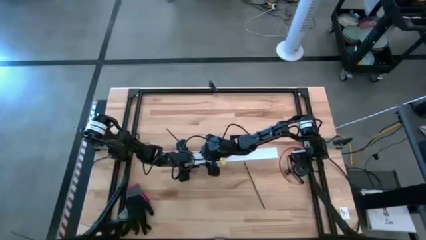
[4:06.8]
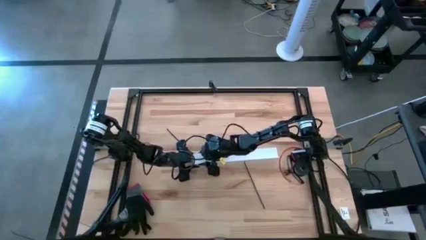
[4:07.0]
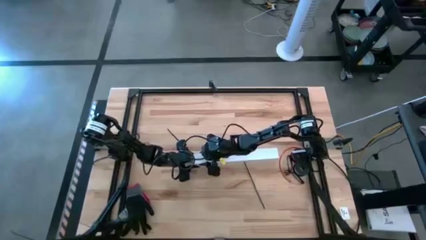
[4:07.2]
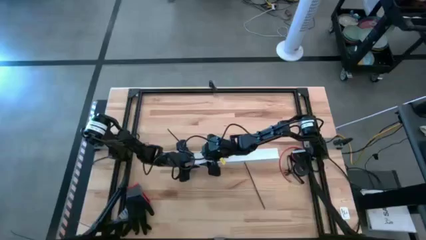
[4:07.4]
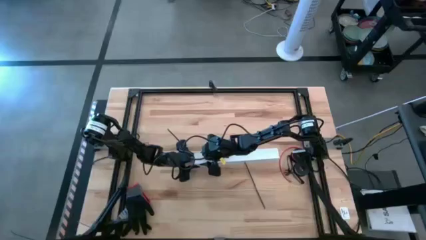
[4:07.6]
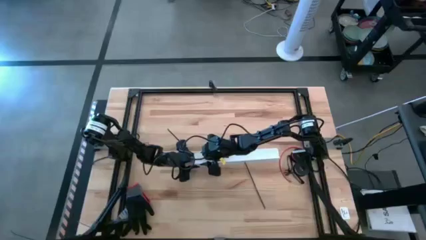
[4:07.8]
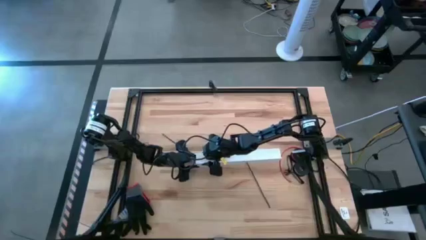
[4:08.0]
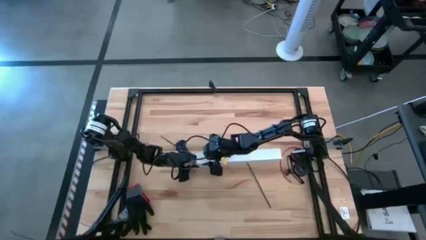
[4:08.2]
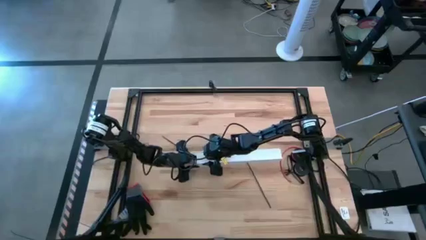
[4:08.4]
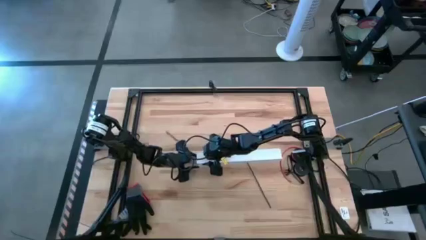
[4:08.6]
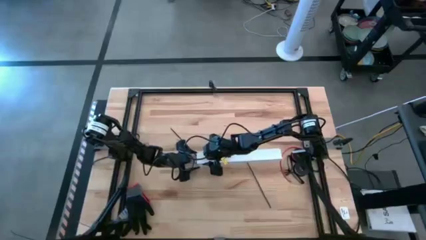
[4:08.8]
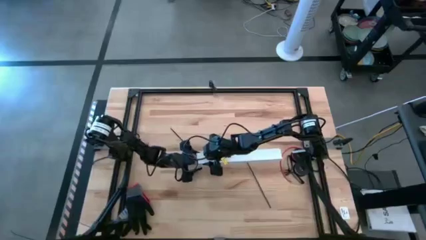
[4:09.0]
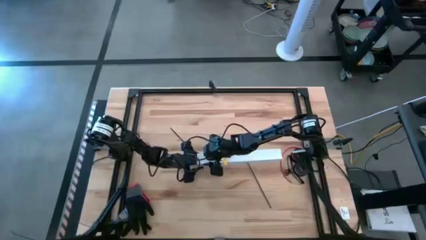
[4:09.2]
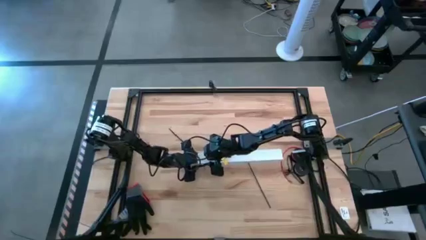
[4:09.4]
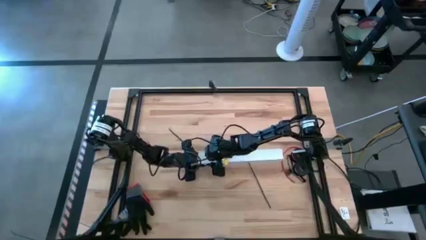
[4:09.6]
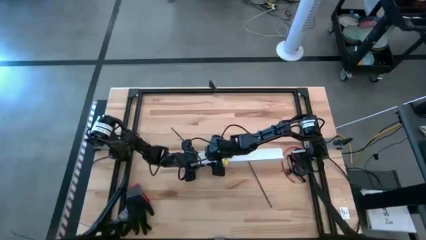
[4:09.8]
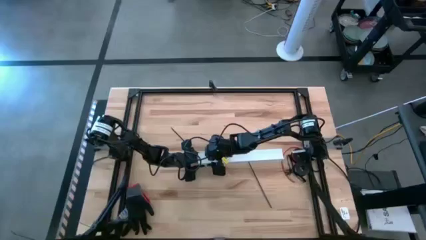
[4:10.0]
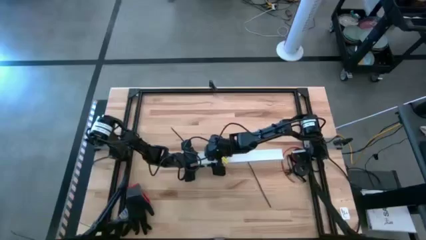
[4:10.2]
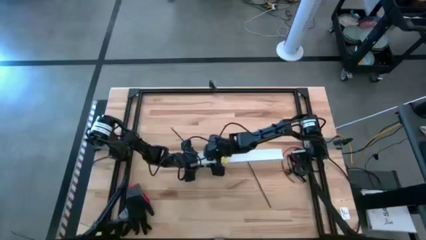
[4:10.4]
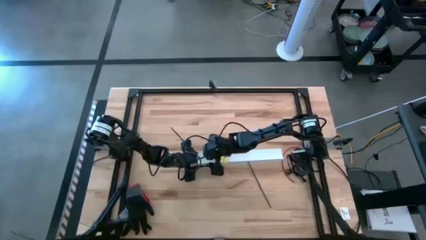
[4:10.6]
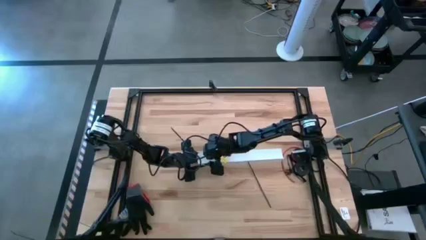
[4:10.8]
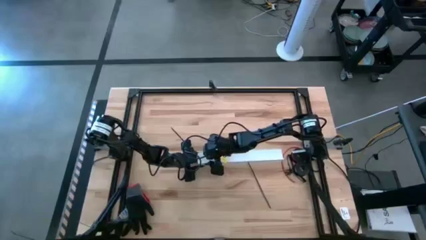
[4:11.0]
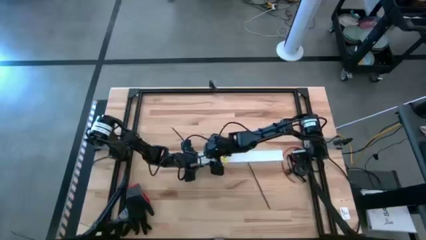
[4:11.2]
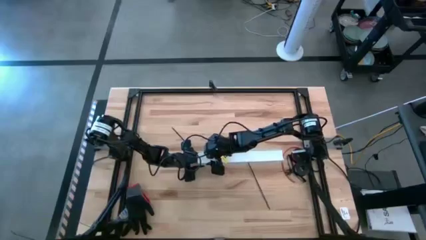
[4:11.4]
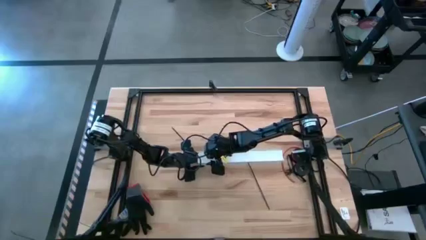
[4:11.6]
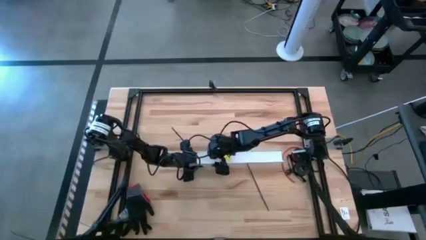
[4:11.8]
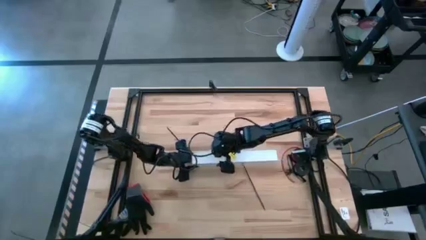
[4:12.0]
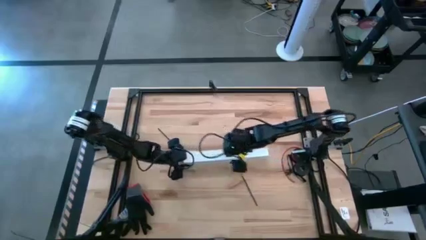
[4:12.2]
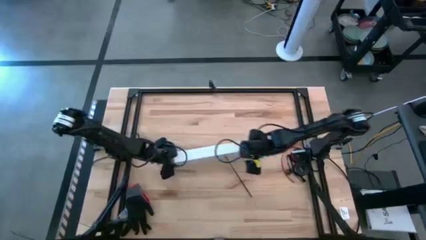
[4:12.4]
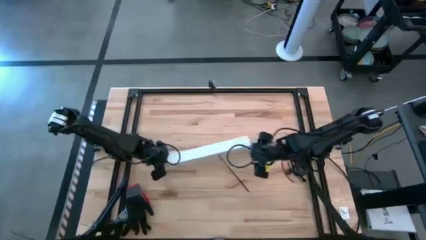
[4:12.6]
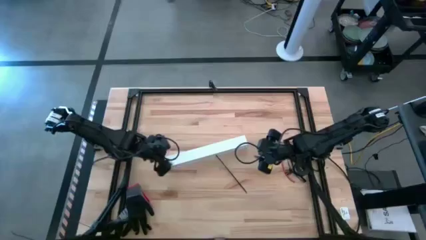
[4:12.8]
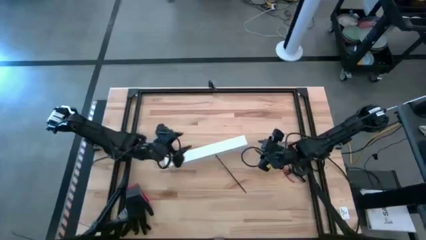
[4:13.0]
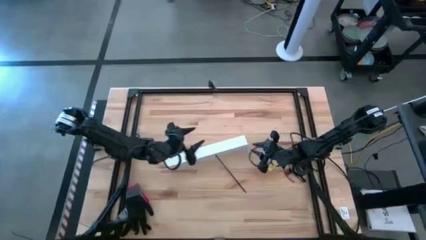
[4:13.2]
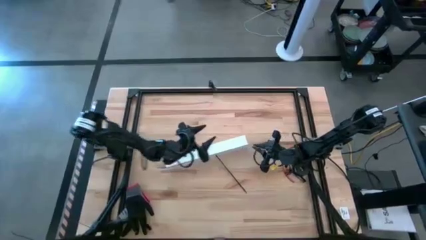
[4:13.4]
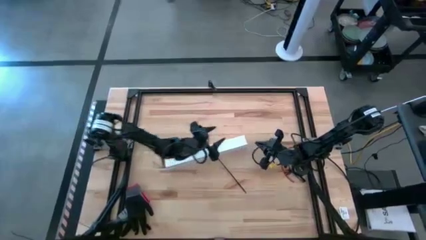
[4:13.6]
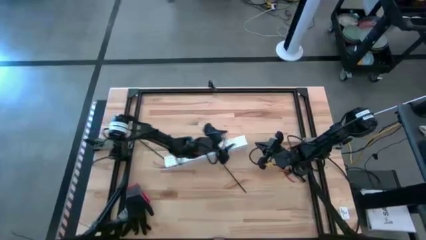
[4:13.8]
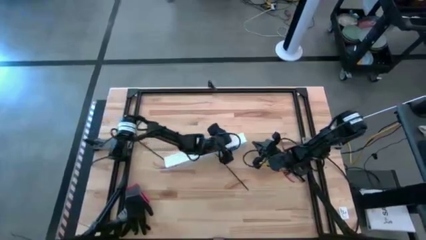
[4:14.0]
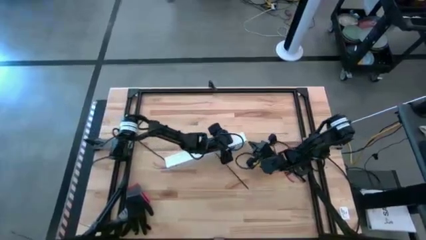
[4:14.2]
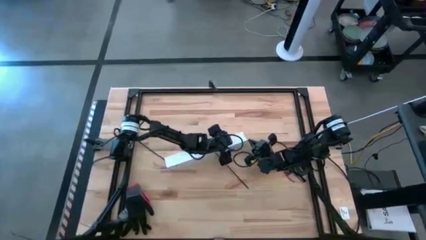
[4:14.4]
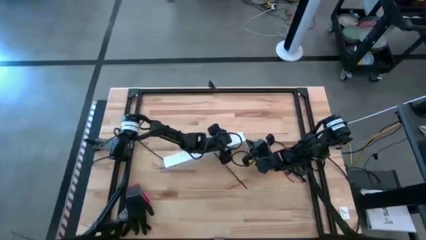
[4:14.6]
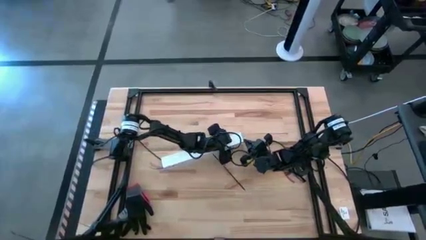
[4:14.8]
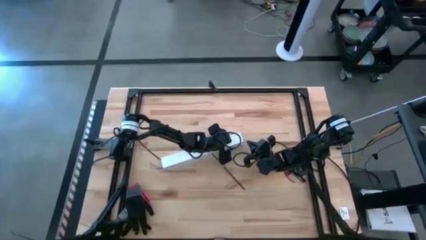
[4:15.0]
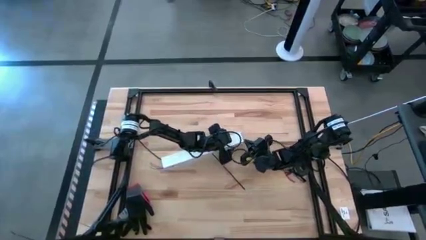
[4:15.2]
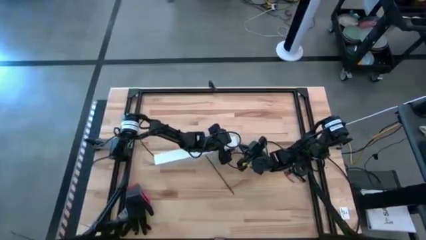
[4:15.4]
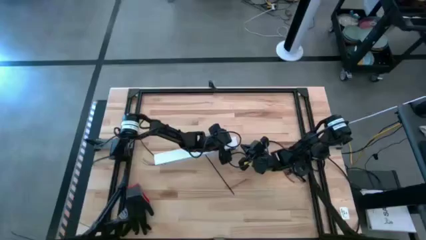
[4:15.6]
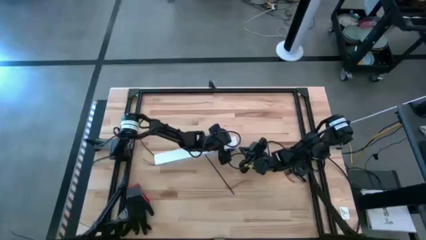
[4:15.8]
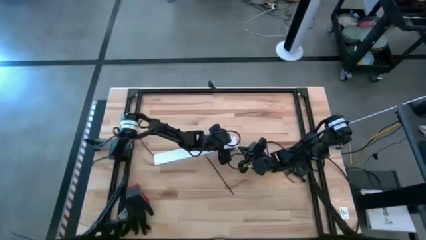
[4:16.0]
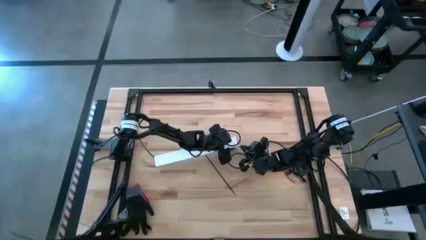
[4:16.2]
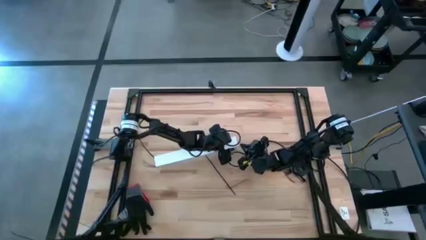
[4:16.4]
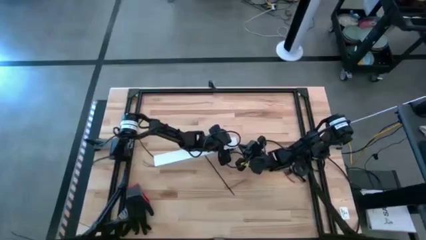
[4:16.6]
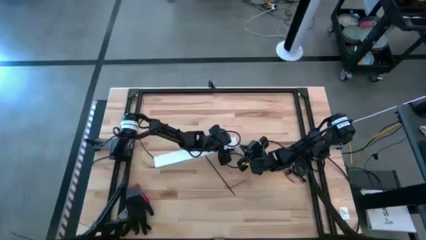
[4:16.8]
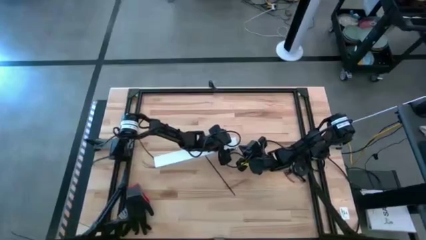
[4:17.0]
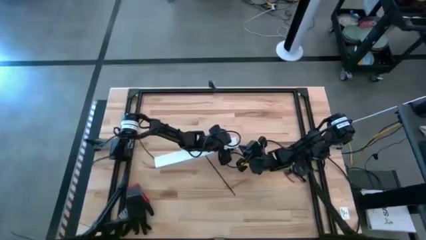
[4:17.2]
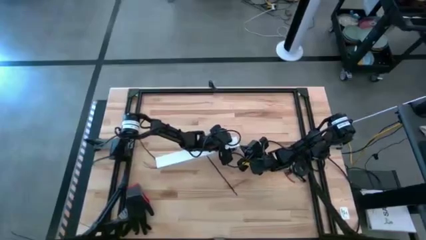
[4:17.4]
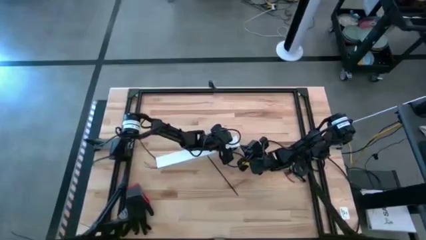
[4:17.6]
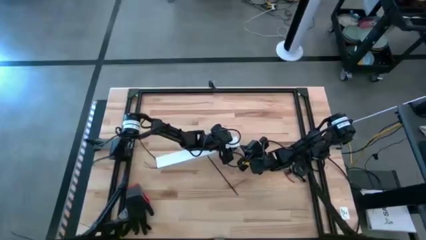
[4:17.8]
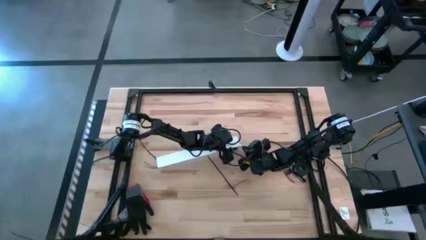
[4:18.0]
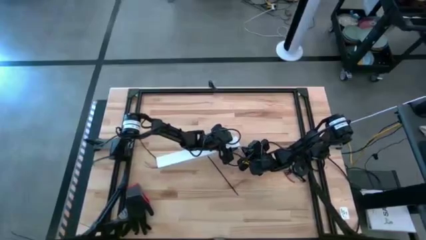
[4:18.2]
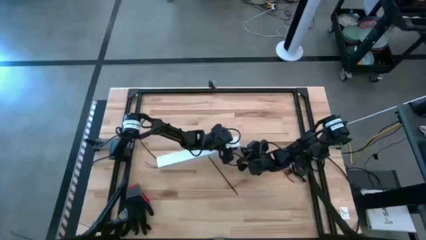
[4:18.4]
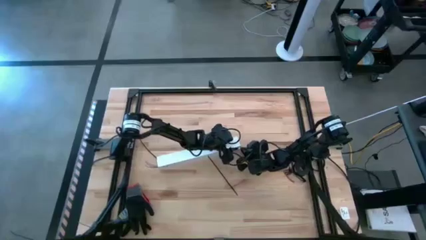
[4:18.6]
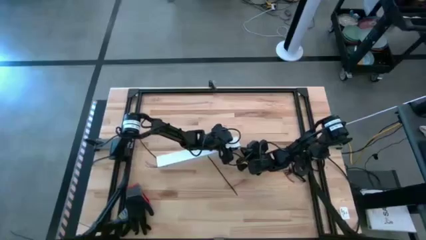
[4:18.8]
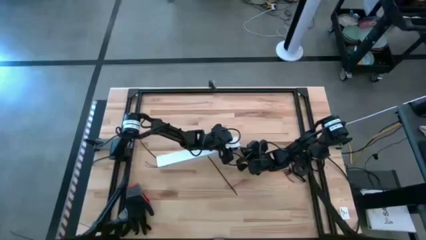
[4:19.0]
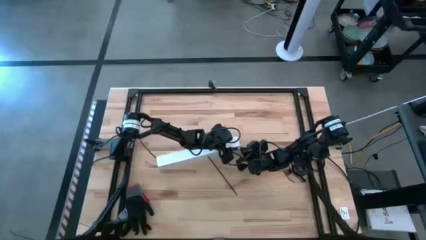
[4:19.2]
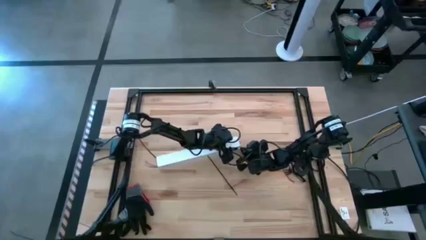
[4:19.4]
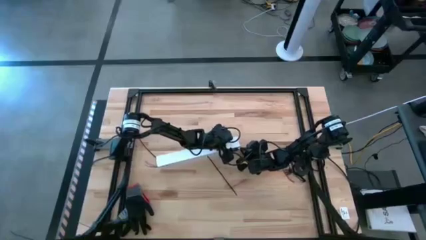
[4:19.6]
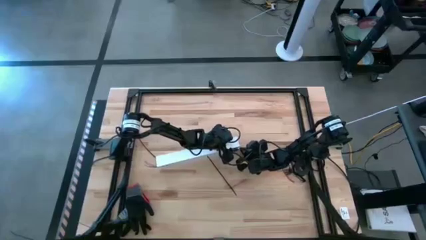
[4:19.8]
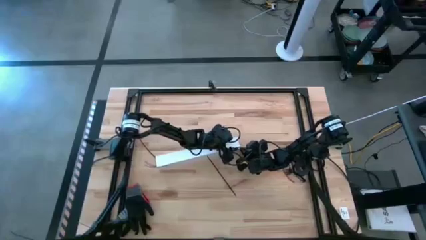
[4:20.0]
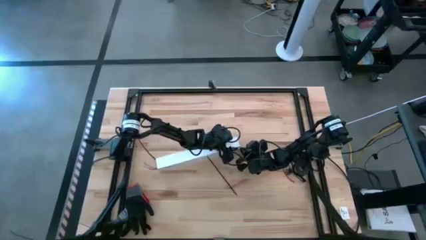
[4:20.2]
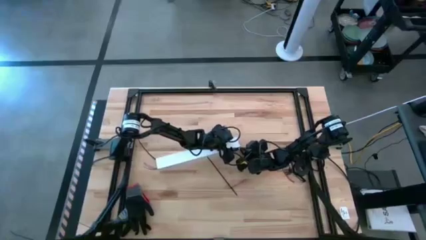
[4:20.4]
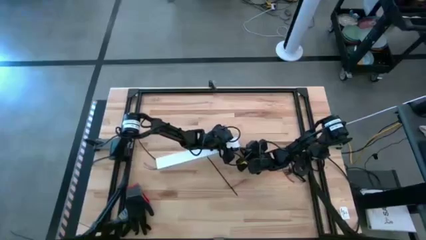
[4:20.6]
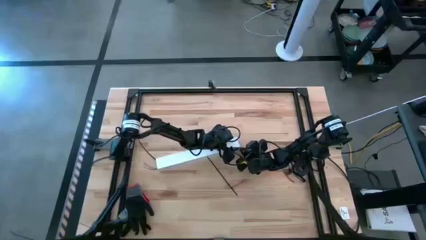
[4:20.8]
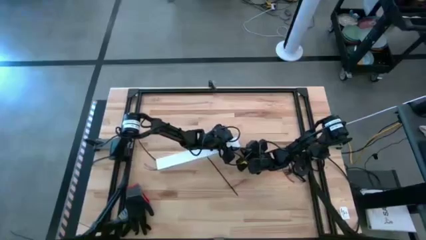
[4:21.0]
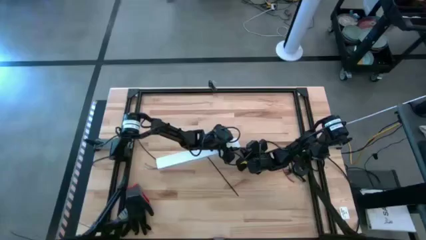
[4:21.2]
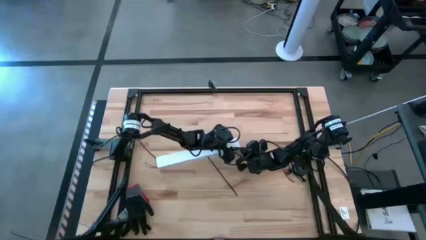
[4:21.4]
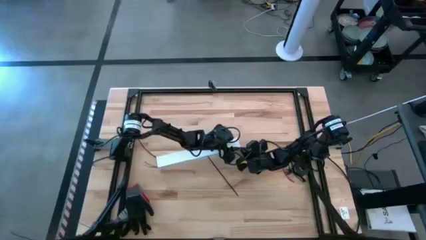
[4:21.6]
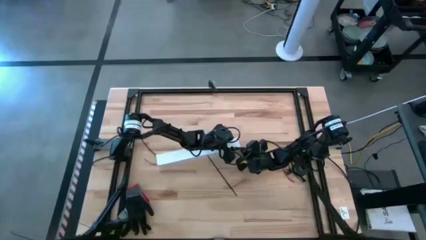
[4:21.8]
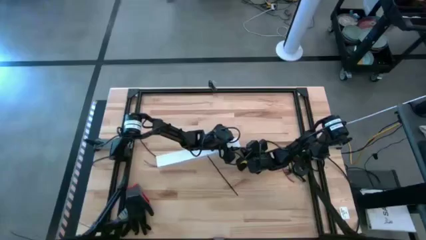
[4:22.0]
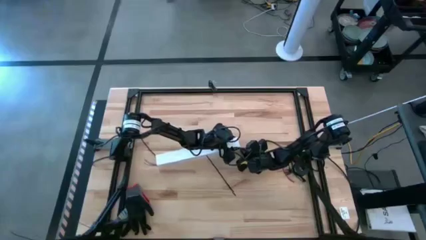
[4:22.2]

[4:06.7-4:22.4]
Task: Ziptie cables
Close the white cable duct

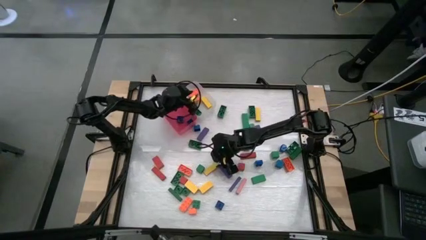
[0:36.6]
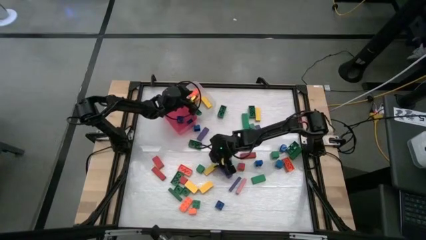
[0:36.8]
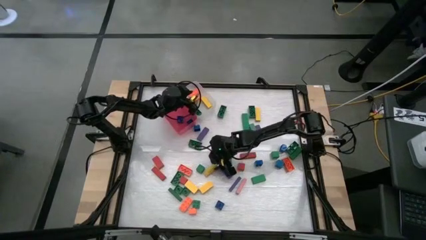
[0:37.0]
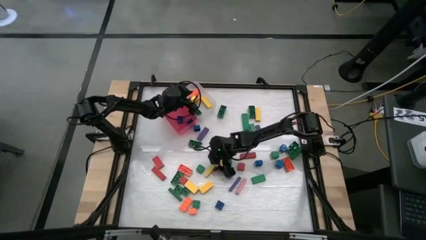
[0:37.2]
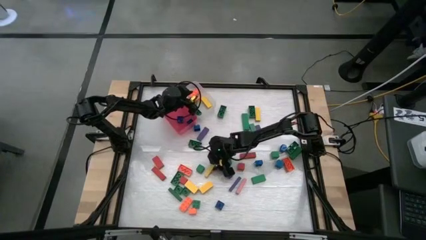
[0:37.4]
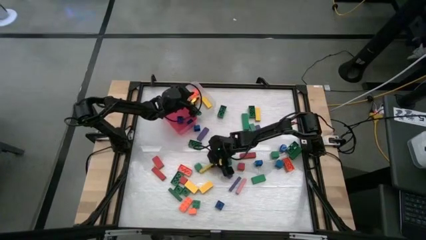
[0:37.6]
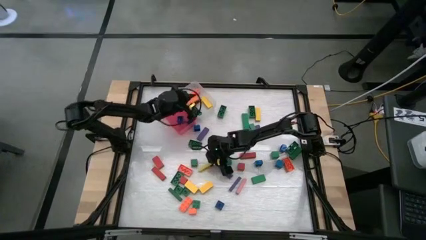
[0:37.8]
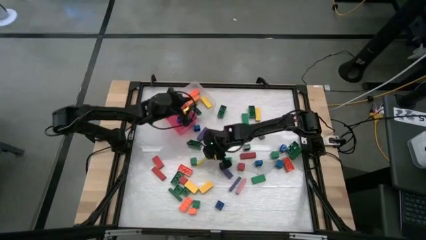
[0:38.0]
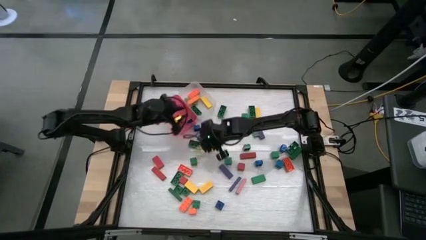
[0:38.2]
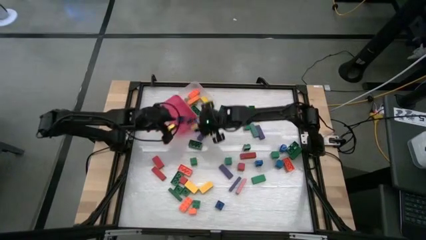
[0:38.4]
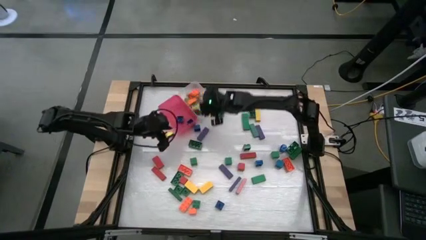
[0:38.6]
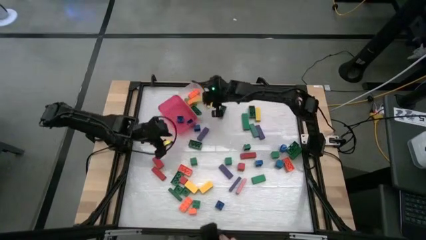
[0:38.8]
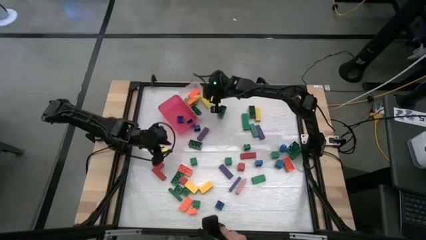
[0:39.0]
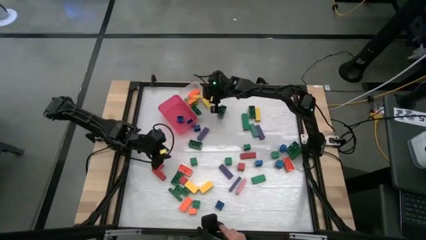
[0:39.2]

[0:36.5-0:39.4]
Task: Sort blocks by size
Put the big yellow block into the white bin
